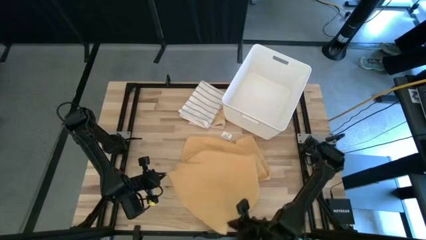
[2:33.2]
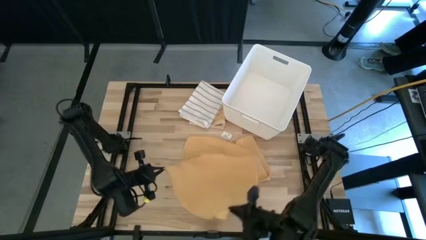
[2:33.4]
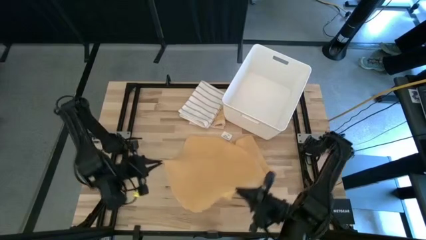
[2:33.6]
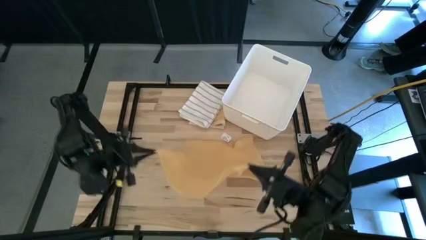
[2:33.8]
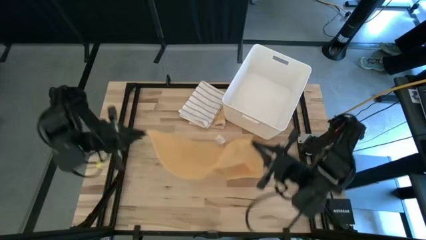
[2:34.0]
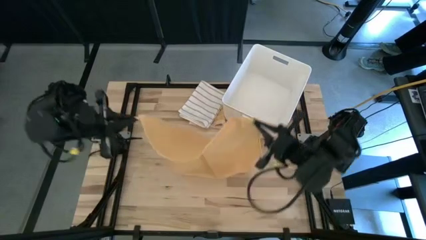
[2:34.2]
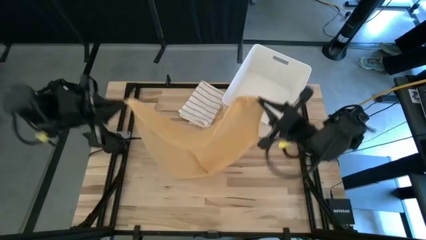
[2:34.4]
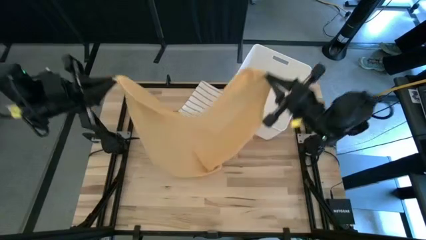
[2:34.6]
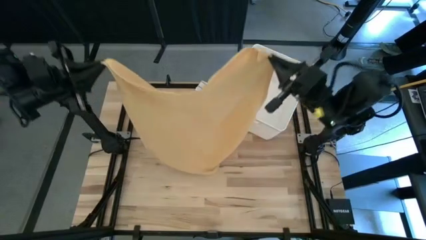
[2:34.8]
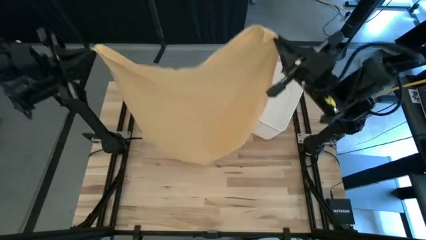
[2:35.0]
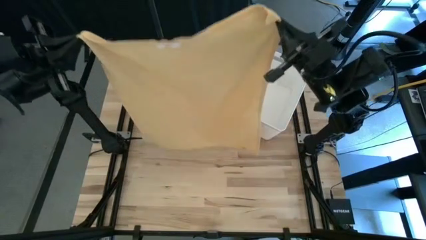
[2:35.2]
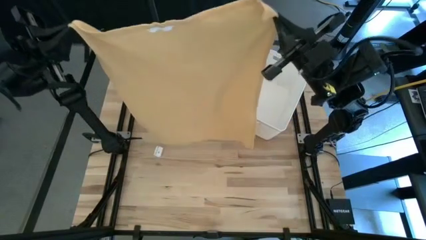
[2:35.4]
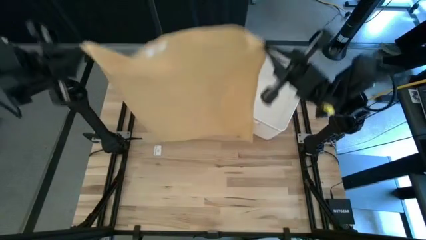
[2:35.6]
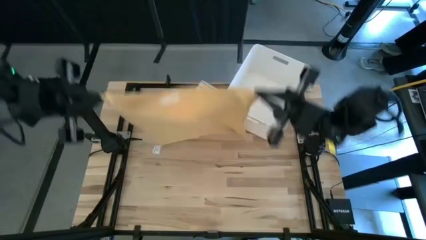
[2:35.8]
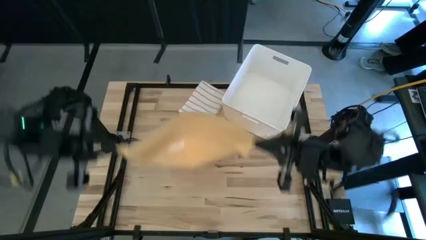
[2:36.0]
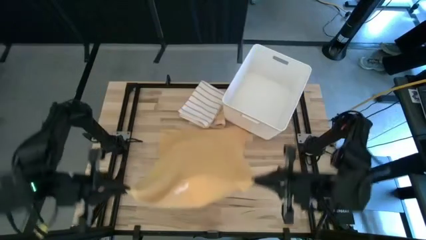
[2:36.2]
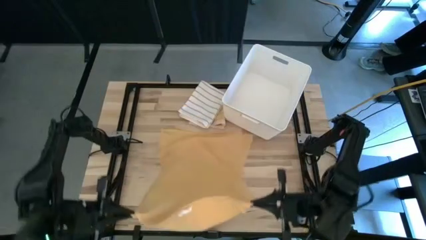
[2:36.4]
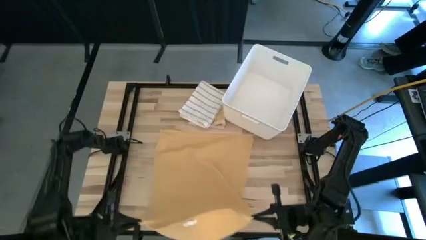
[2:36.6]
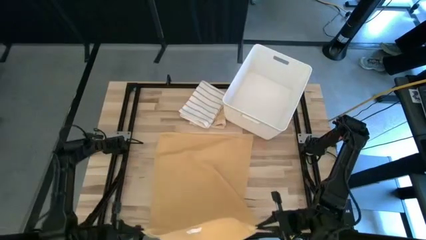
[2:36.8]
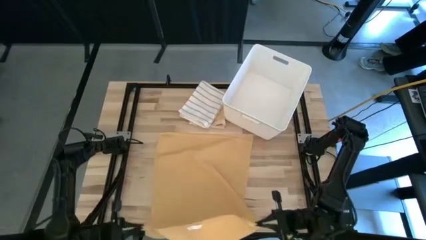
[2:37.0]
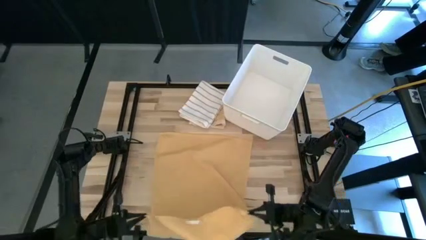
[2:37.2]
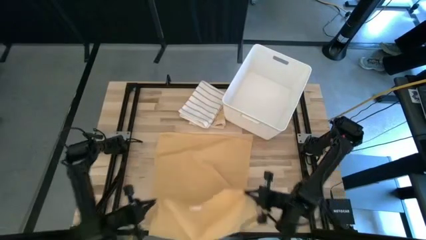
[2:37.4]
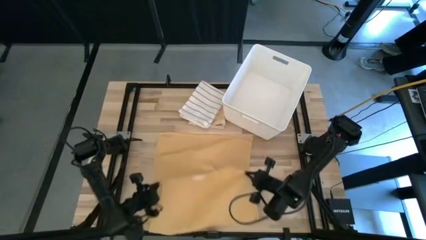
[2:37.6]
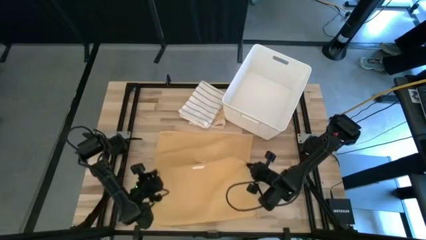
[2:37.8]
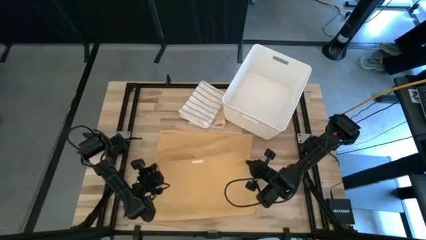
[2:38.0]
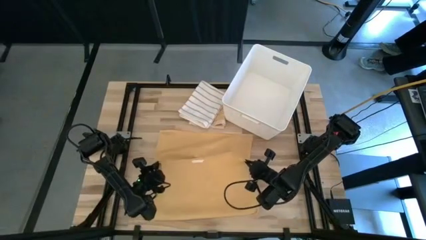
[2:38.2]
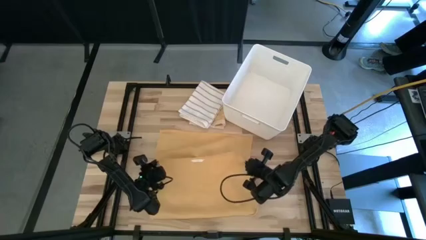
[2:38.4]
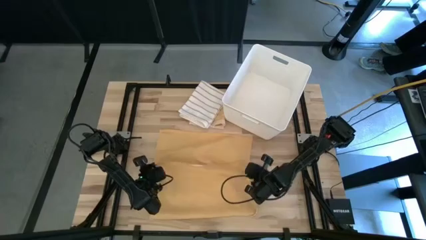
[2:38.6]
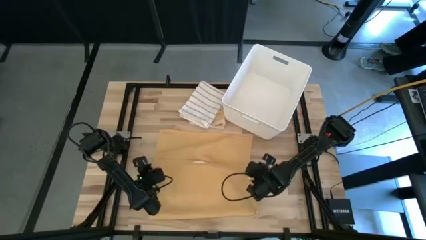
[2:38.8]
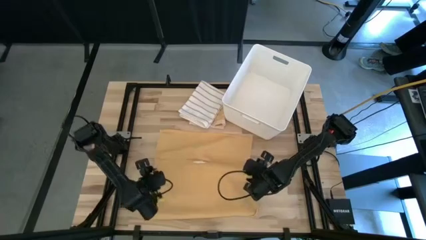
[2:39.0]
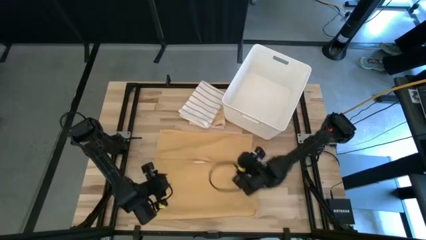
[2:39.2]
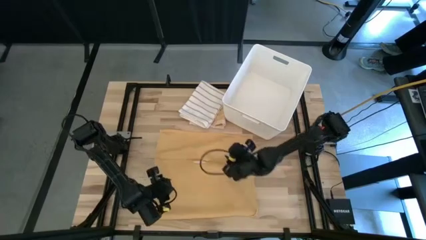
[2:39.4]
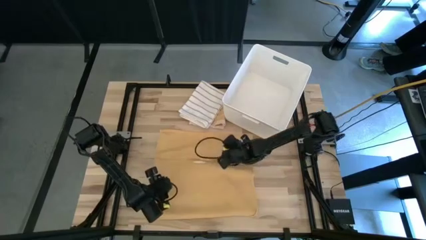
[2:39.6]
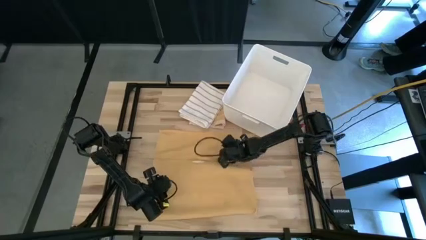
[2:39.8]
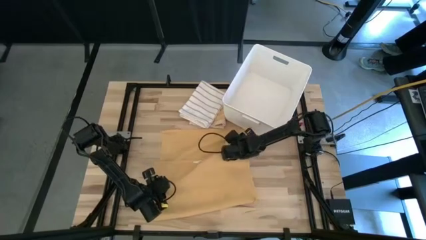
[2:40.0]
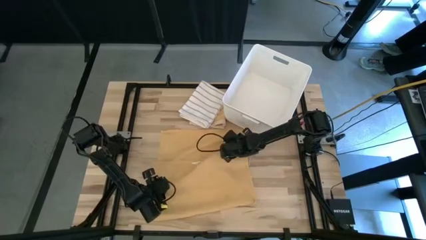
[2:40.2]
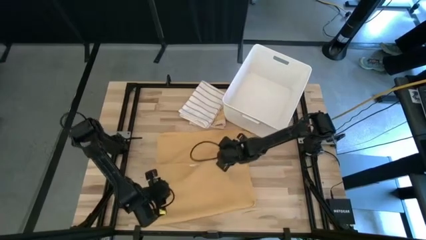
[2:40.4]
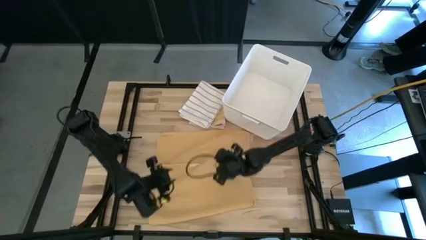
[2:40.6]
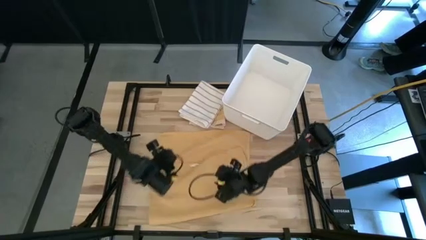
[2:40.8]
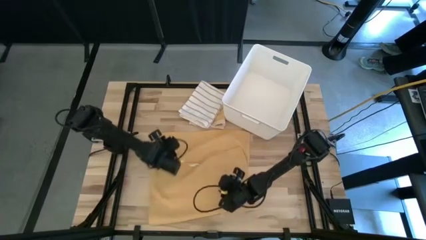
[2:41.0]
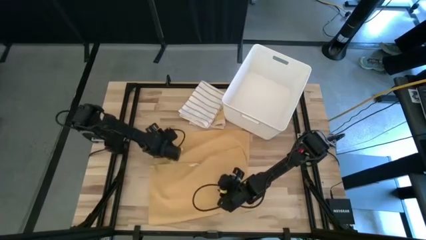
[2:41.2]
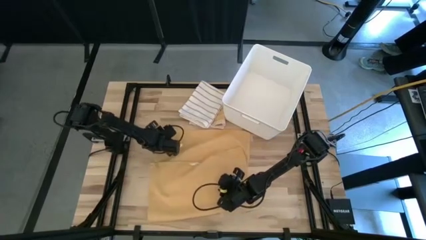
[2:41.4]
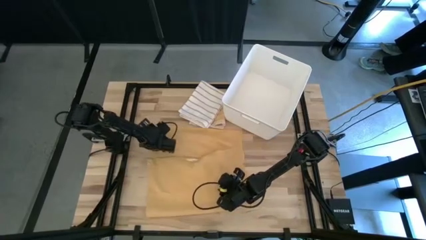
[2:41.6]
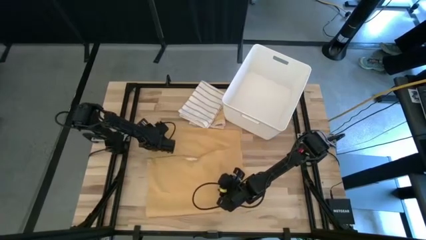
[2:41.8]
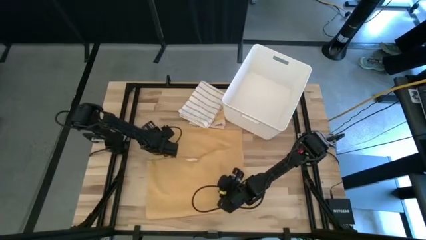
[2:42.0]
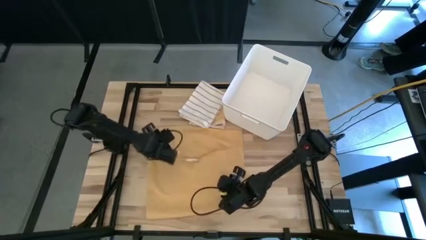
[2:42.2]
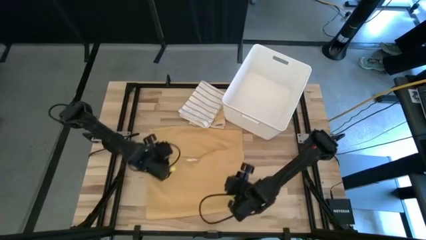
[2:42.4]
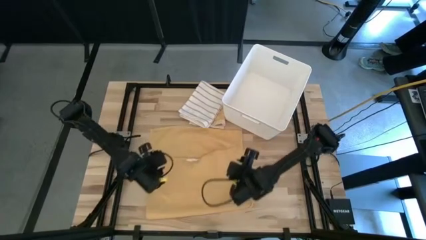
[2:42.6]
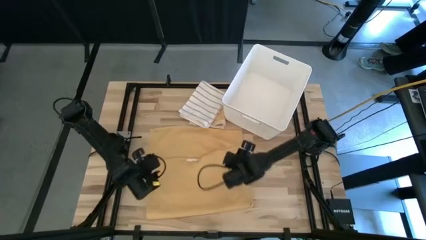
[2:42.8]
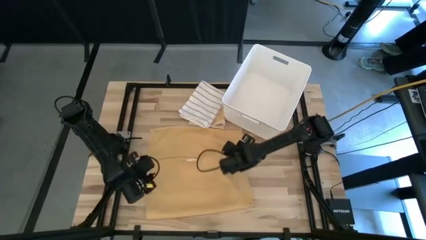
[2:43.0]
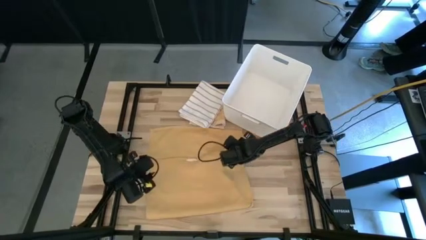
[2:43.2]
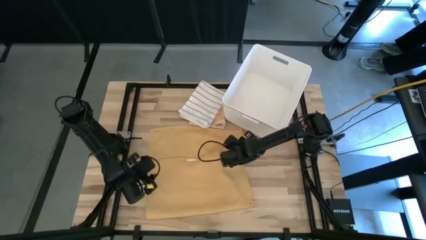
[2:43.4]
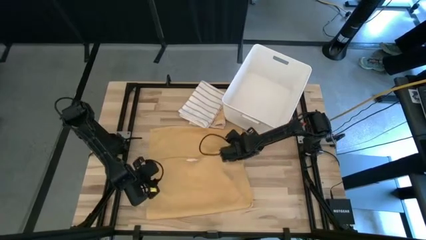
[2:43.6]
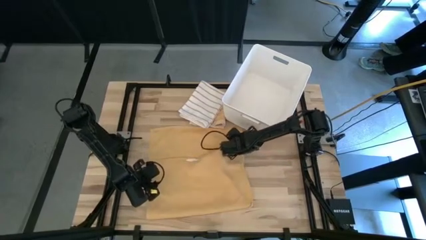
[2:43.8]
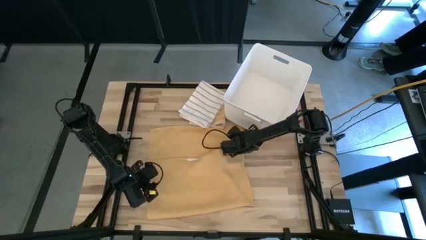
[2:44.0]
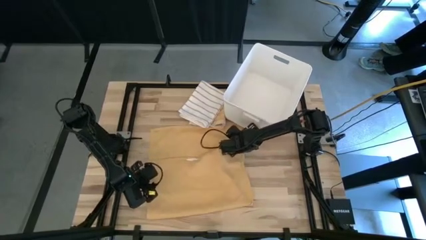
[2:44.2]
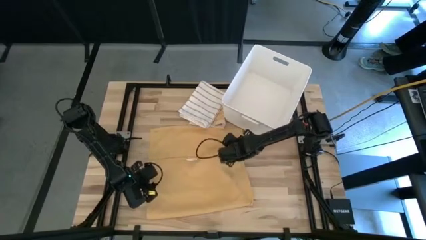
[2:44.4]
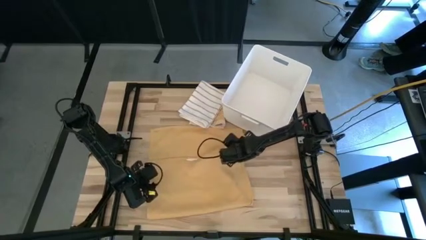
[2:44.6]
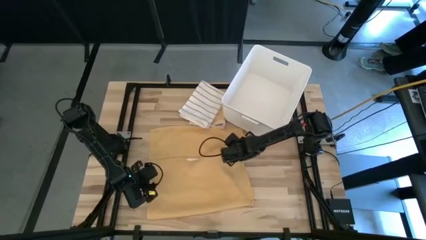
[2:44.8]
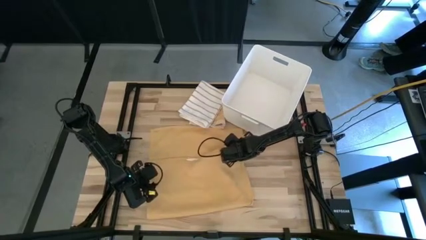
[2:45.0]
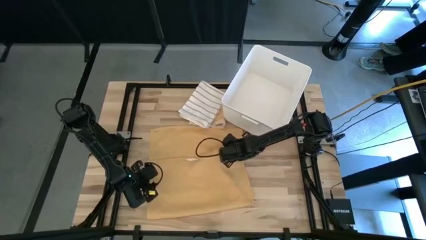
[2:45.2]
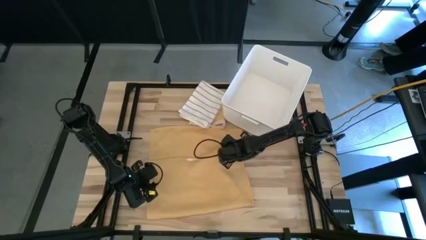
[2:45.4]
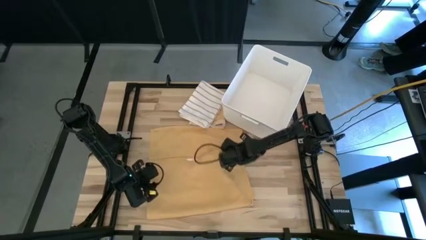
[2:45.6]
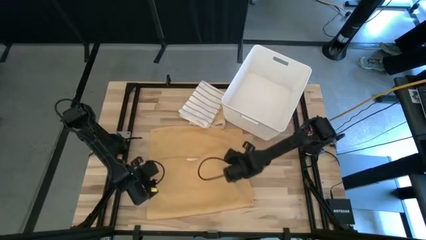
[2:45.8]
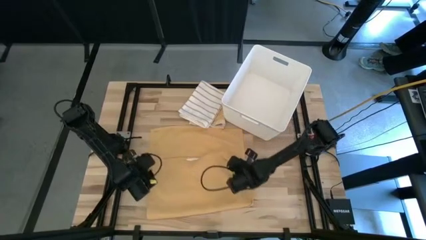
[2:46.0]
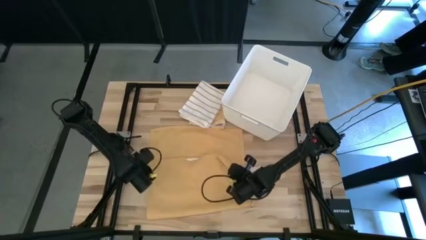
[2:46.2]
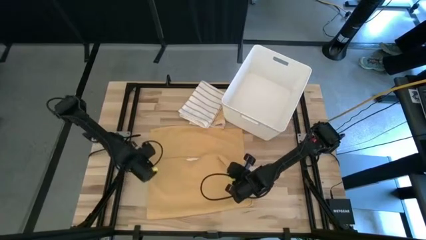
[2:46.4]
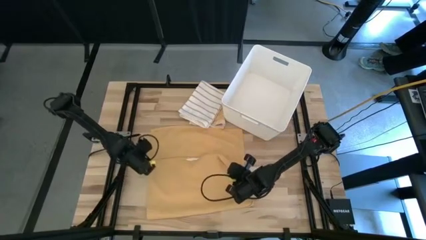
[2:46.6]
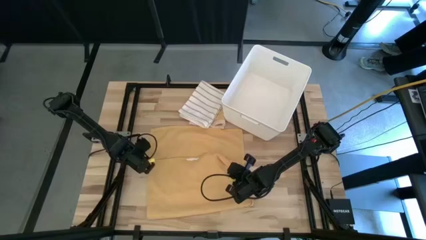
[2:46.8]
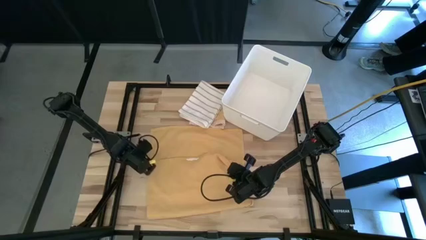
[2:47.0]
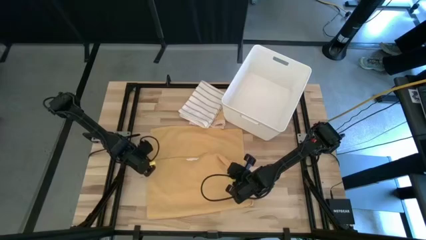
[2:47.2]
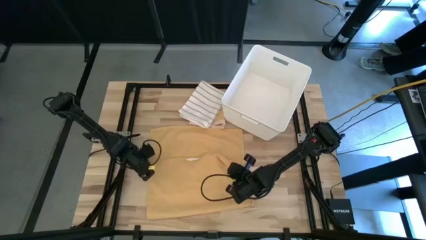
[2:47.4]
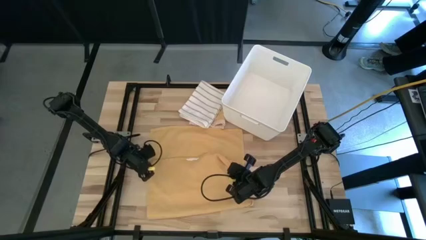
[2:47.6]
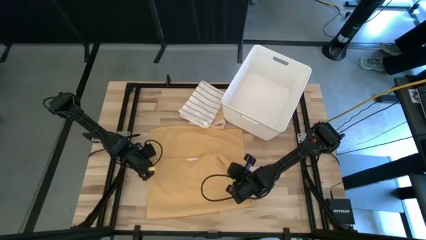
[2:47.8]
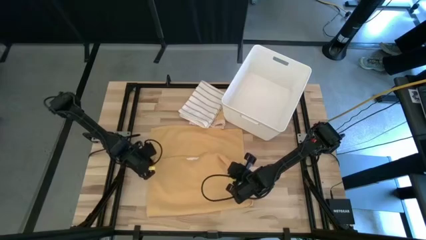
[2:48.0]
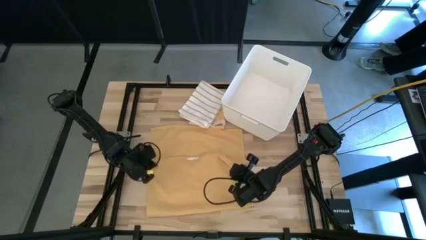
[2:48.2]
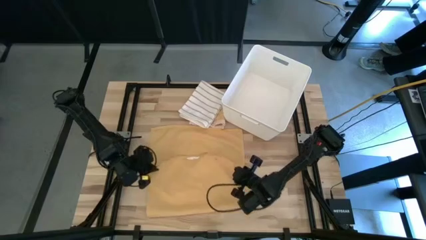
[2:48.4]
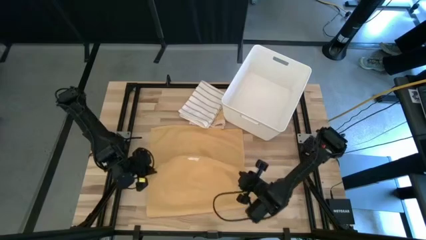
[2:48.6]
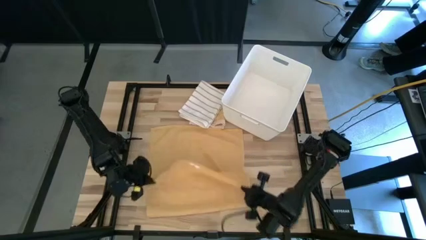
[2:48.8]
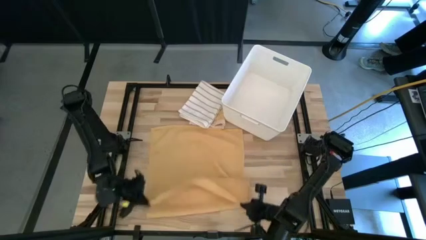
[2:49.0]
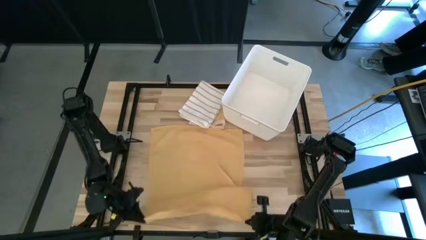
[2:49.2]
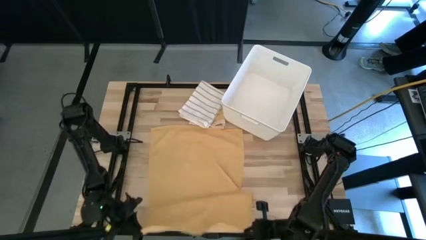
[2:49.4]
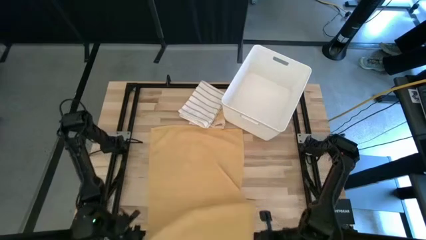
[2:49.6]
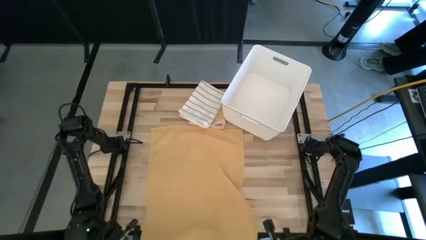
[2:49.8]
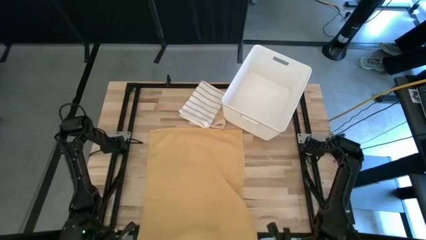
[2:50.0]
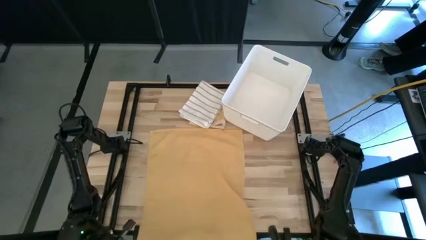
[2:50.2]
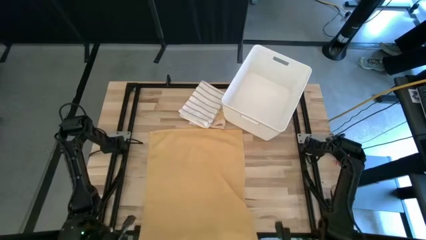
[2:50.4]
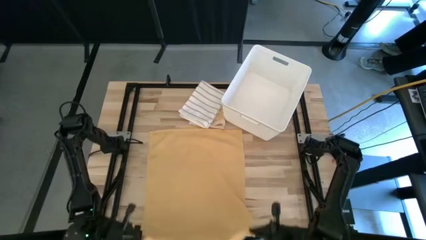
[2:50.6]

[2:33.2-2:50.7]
Task: Fold towel
Fold the yellow towel
